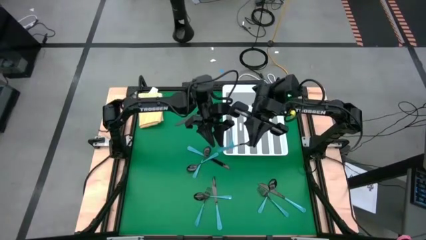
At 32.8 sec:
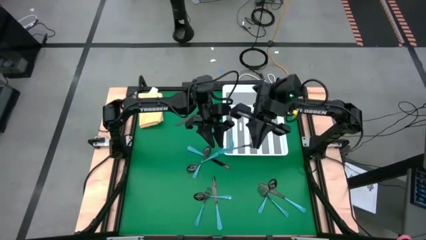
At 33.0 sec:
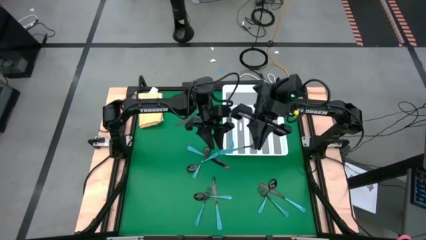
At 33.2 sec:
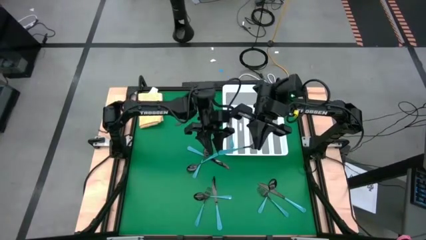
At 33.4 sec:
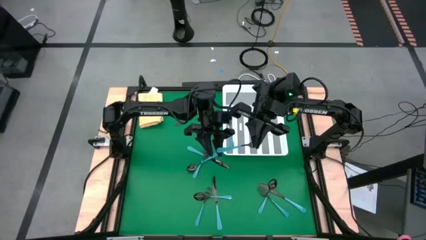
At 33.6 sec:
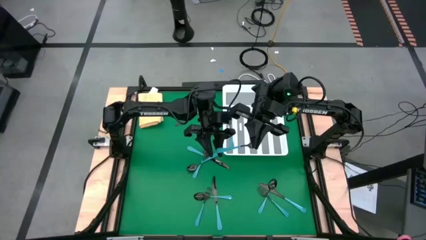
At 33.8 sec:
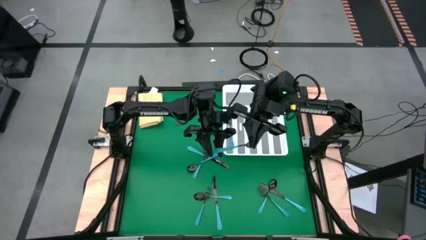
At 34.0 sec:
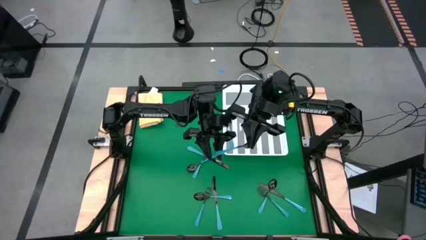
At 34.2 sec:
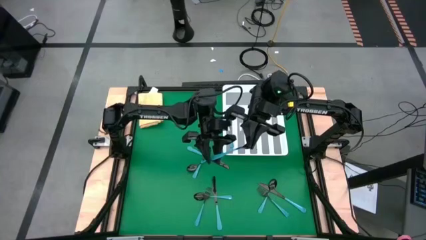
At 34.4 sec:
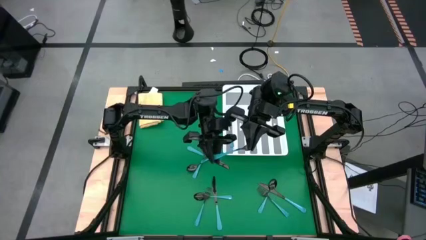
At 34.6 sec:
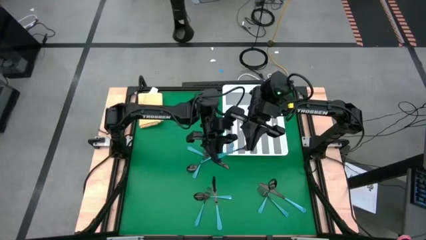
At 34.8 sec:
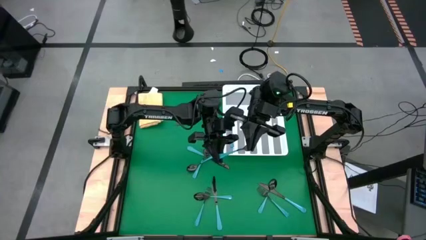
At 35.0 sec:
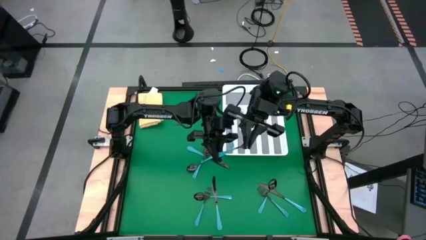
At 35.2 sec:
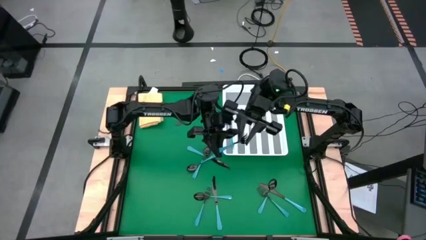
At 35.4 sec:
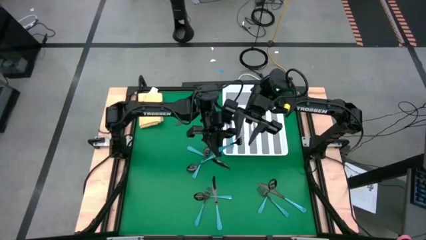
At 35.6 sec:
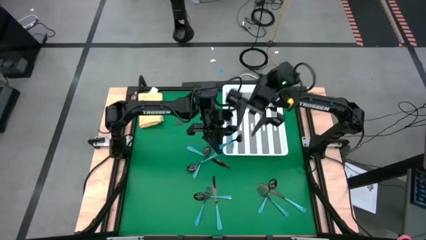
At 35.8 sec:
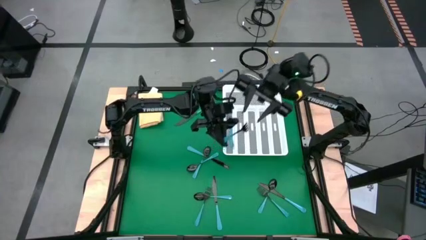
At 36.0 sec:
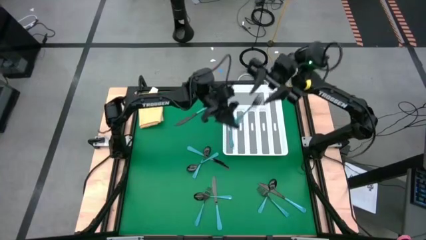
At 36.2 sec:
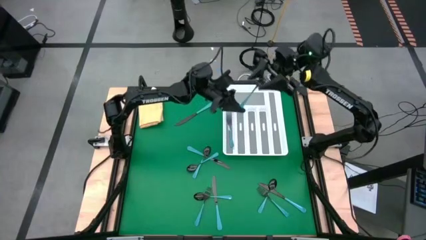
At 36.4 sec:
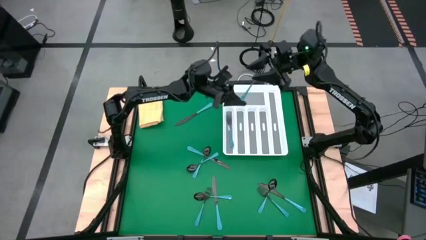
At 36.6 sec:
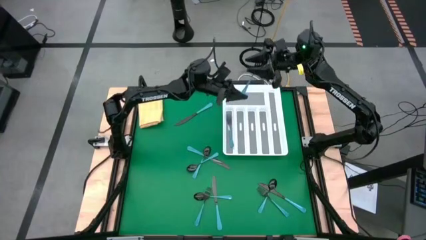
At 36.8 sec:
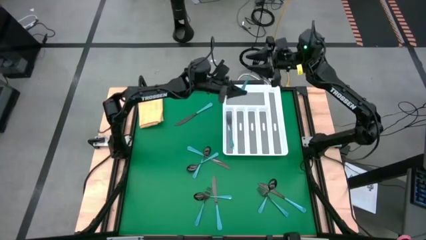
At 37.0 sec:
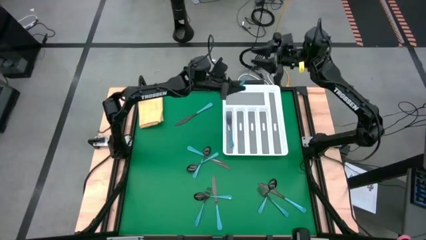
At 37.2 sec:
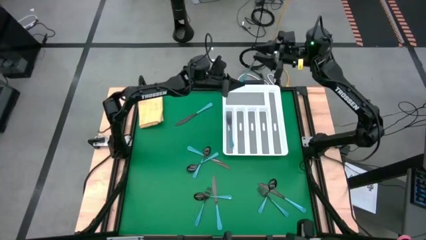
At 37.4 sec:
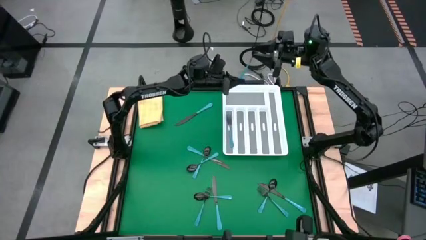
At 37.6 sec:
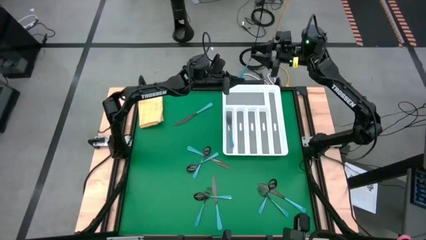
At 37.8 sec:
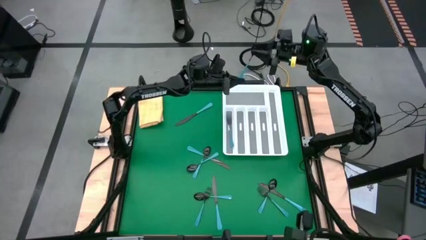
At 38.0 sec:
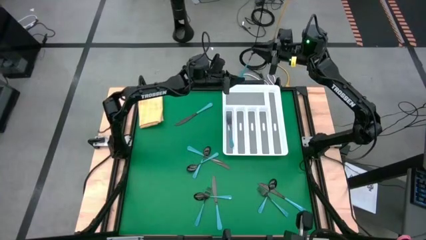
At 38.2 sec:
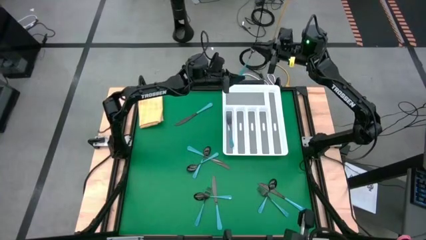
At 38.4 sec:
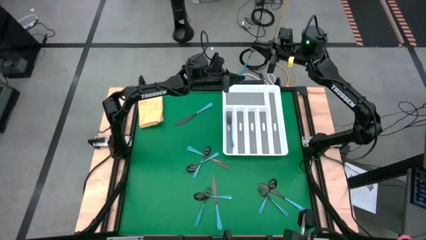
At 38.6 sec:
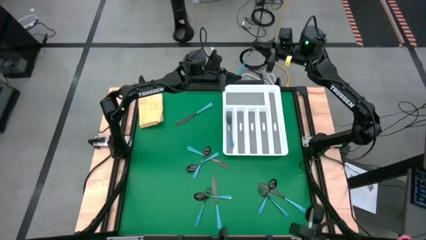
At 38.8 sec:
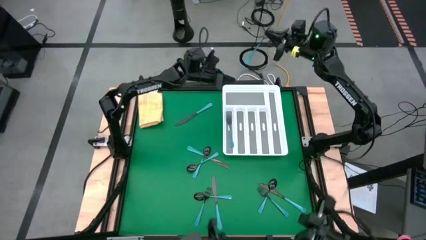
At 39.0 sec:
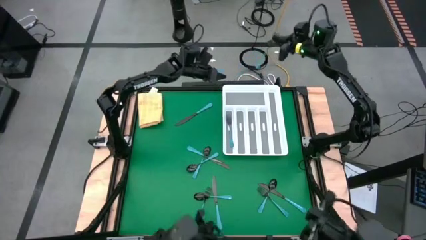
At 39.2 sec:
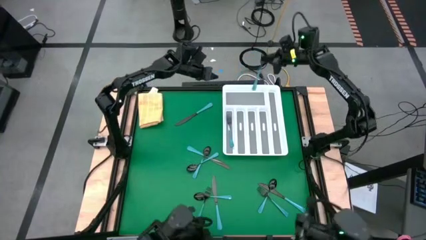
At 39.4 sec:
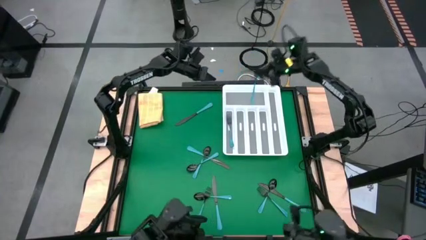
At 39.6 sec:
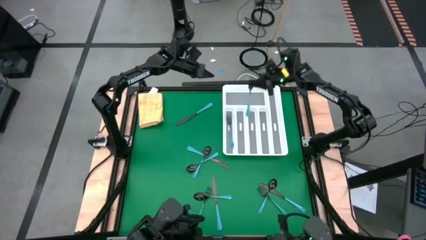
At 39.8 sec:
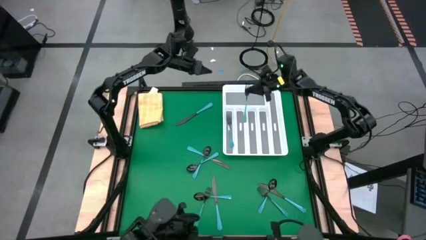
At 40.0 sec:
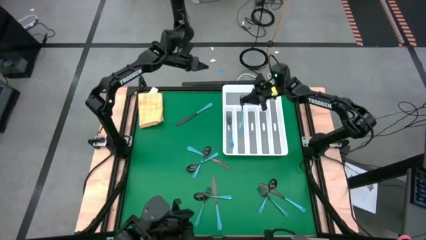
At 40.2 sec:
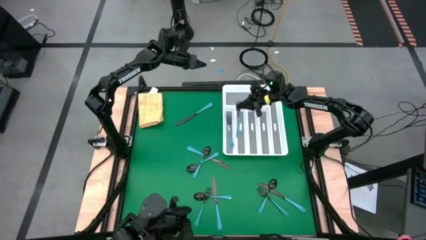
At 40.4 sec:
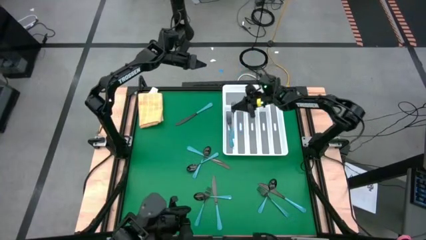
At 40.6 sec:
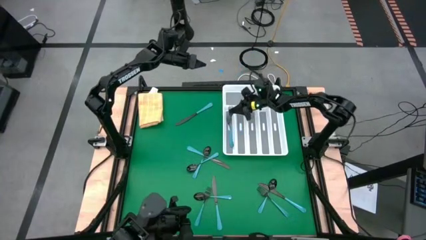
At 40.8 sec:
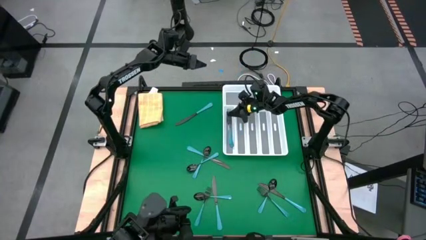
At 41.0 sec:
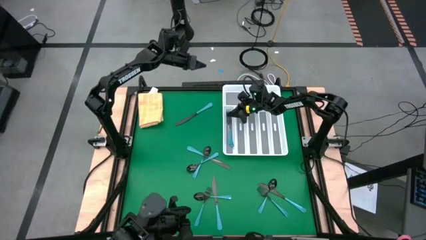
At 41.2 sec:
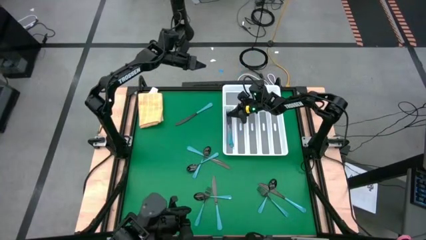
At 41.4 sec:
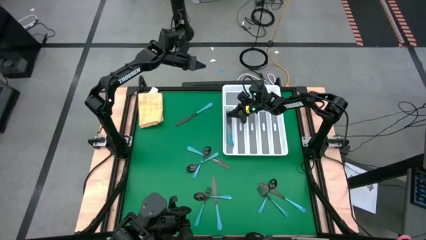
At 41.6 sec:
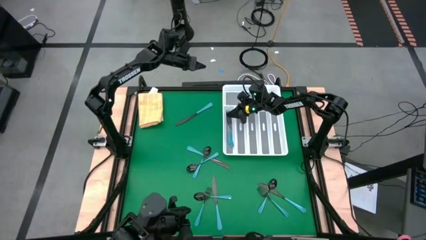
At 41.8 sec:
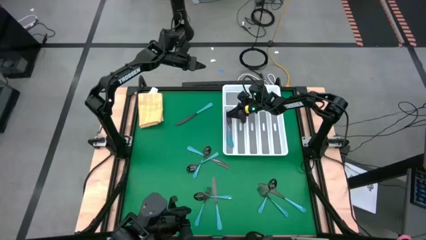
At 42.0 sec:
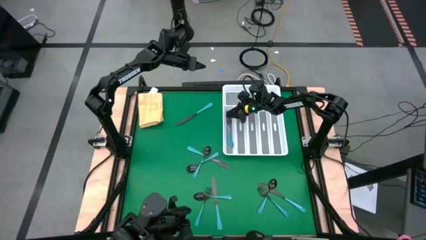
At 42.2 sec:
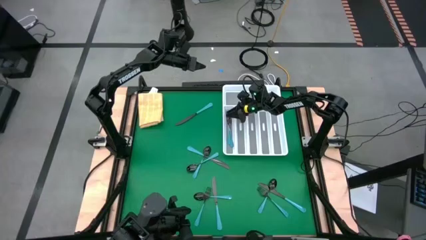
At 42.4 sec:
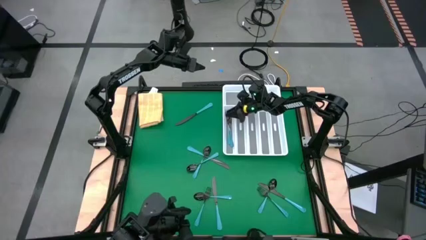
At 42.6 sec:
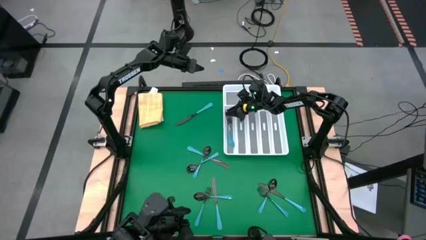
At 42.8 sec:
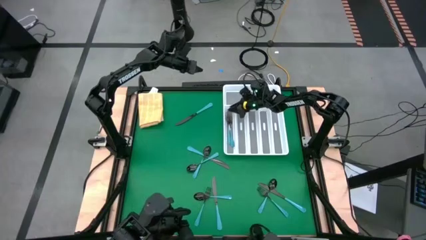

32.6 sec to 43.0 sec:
Task: Sort silverware
Put the blue fork into the silverware organizer

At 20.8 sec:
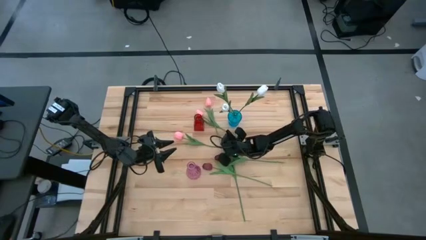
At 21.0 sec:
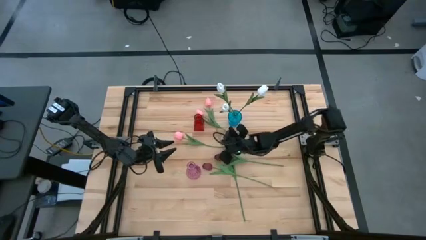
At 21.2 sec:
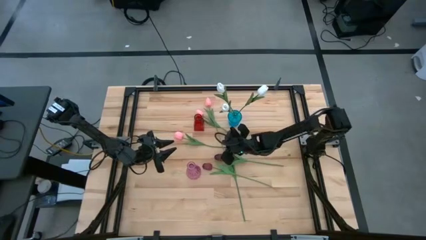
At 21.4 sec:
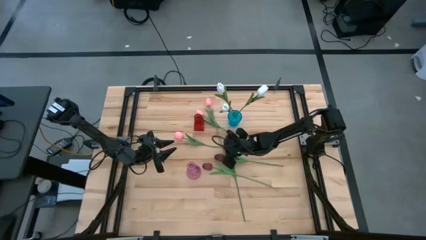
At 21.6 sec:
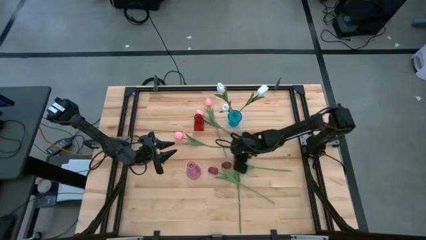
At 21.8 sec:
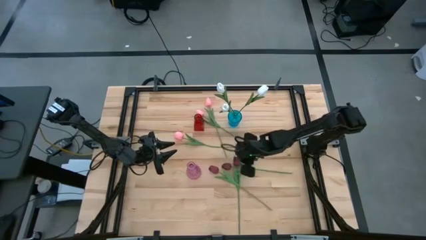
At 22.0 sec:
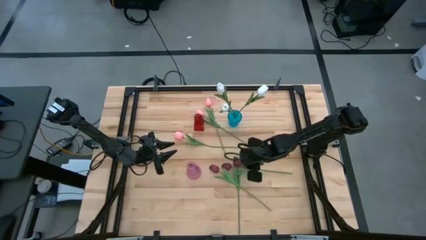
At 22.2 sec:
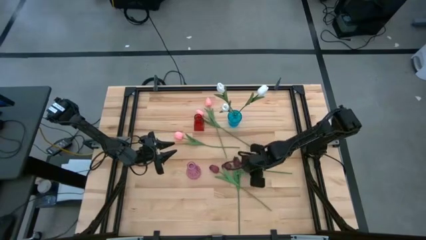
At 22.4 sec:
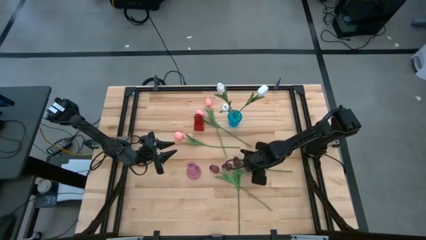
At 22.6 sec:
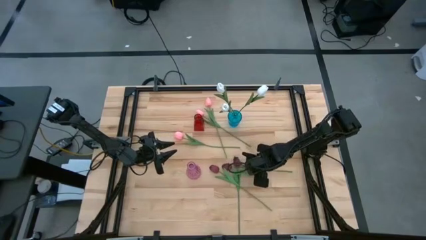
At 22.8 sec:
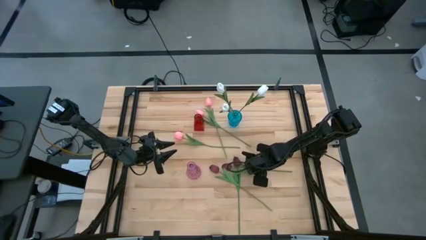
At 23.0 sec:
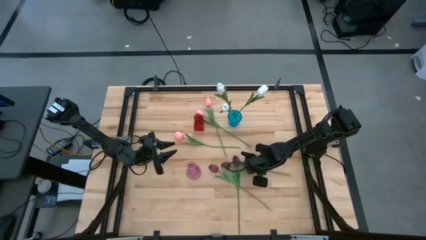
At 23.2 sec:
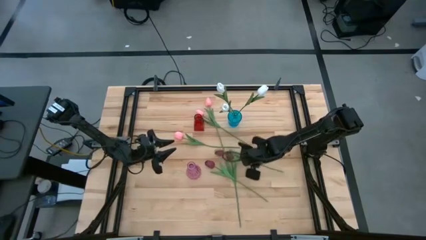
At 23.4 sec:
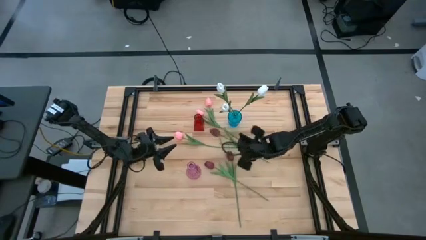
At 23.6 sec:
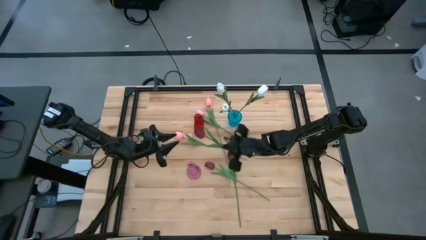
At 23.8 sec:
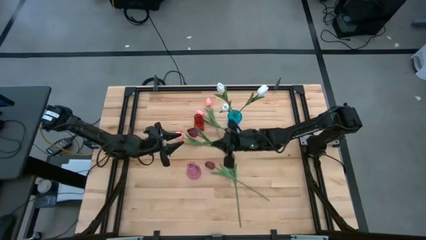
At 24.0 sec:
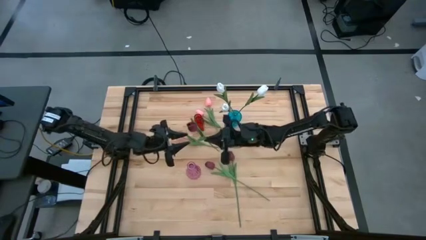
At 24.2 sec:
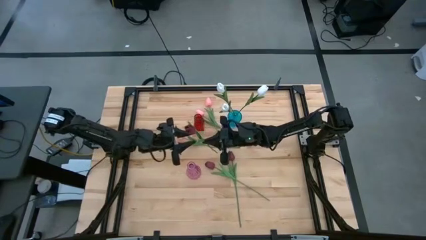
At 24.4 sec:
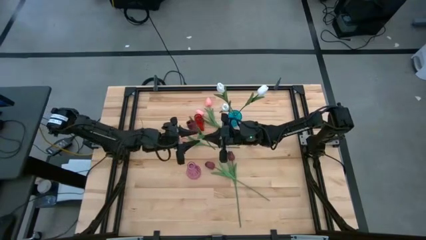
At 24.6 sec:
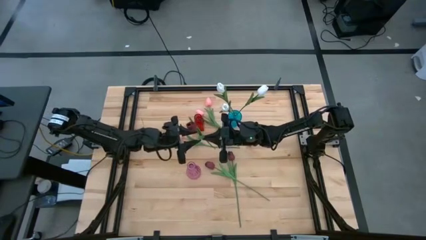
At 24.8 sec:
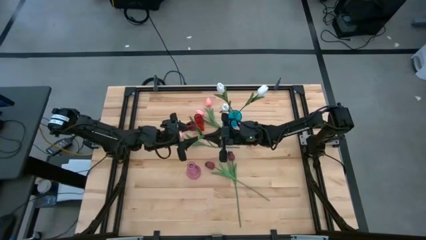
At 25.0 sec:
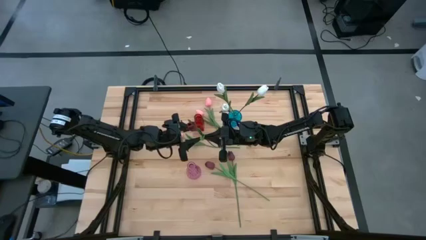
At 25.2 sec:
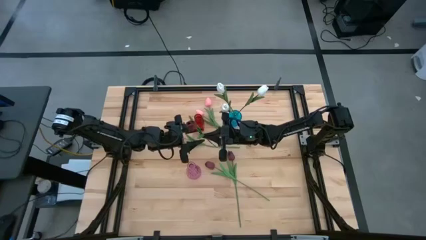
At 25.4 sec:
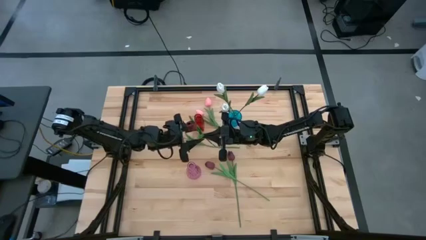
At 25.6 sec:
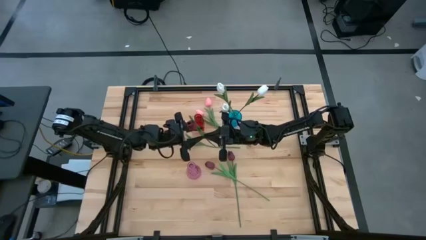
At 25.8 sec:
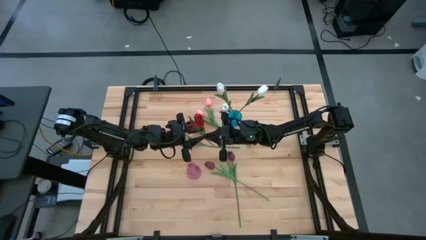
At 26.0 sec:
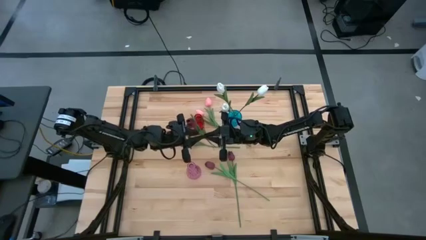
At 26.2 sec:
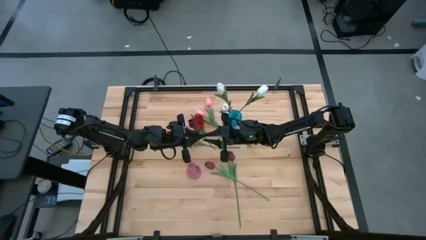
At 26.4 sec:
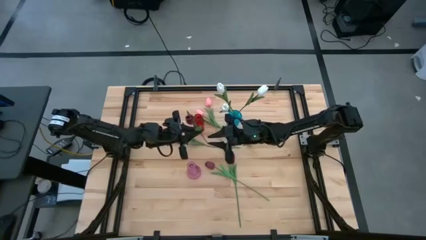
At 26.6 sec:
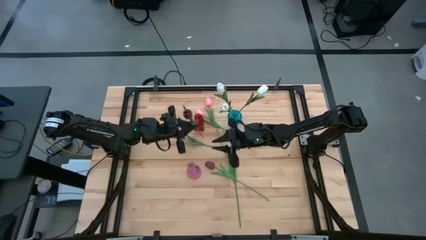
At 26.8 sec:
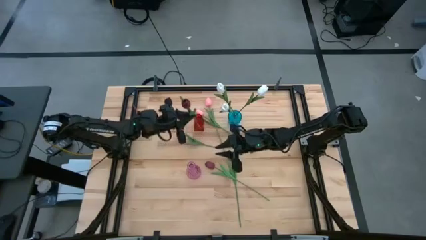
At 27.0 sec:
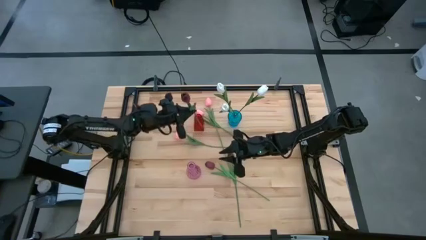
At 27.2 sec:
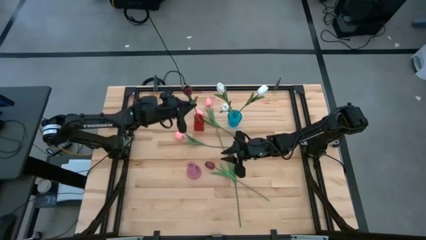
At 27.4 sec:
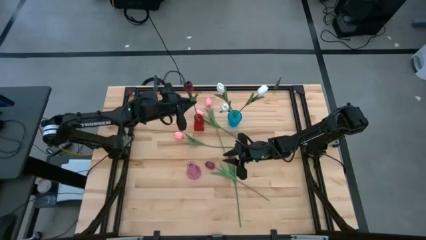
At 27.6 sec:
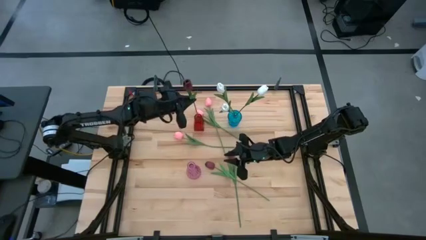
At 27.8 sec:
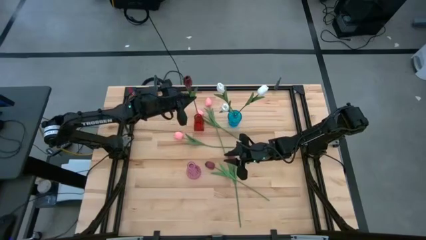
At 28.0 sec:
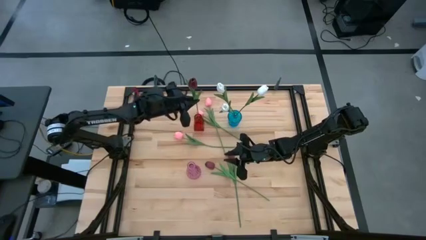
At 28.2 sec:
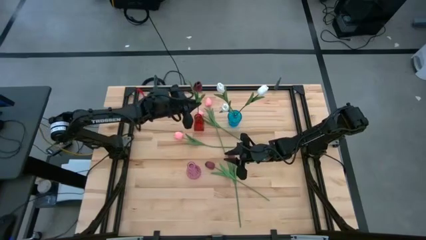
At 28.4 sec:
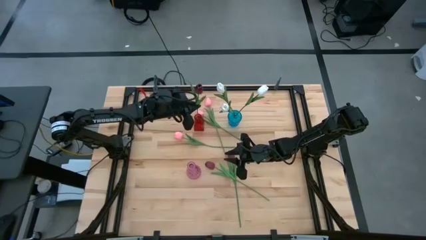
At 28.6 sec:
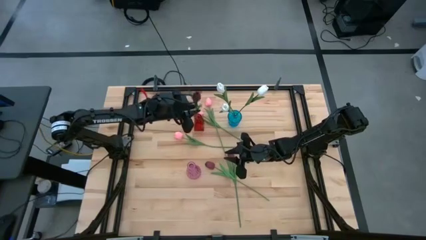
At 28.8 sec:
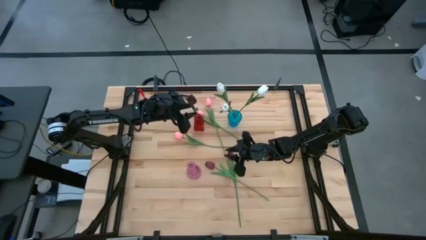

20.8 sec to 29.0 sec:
Task: Sort flowers into vase by color
Put the middle red flower into the red vase
